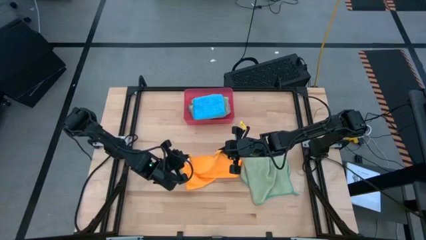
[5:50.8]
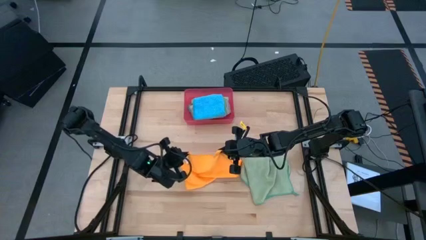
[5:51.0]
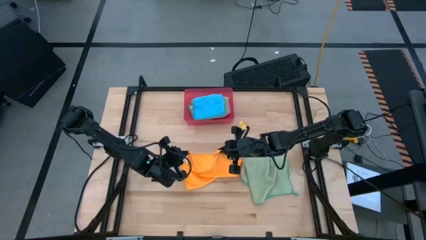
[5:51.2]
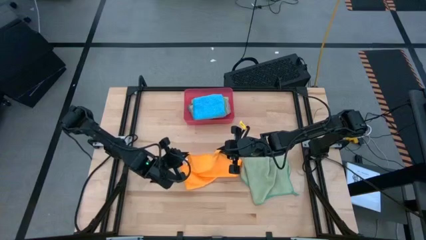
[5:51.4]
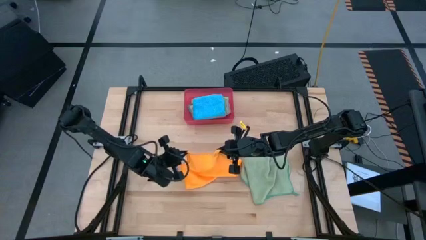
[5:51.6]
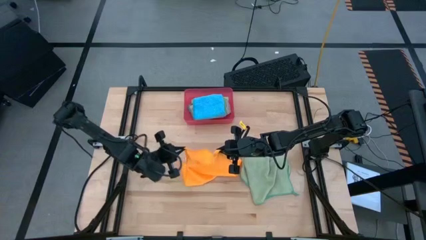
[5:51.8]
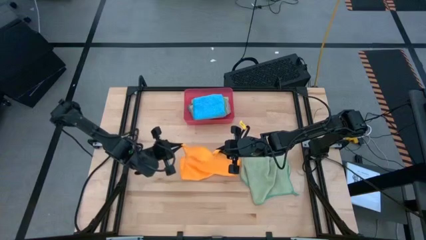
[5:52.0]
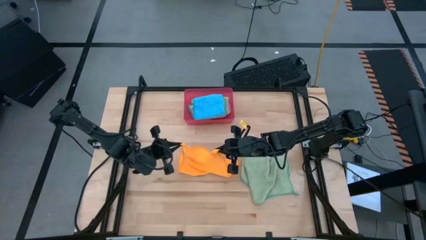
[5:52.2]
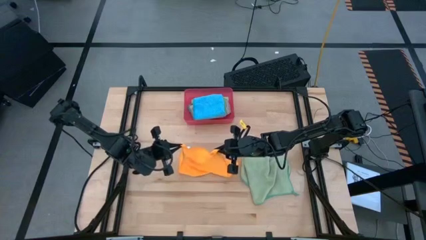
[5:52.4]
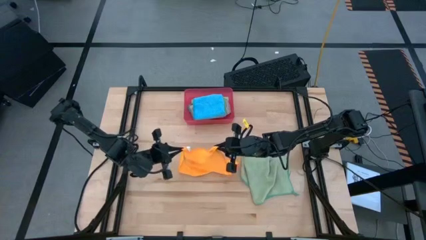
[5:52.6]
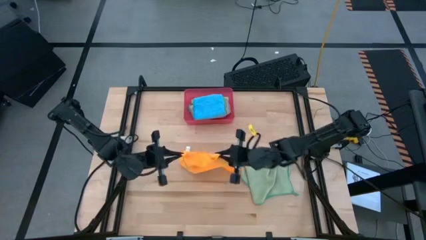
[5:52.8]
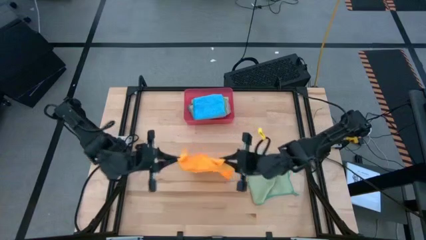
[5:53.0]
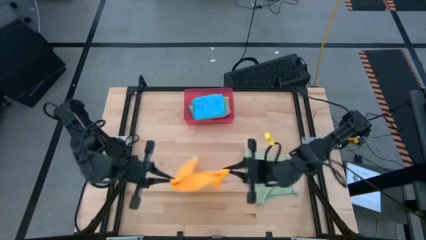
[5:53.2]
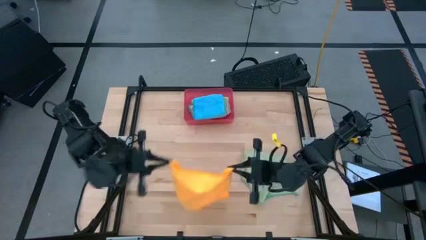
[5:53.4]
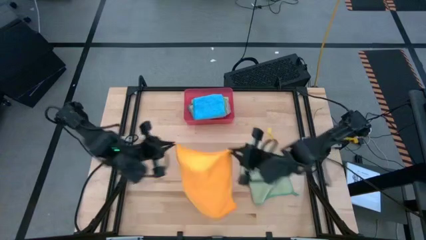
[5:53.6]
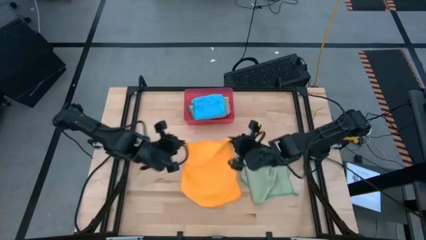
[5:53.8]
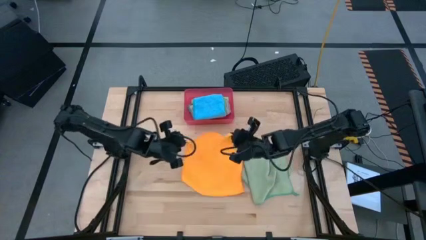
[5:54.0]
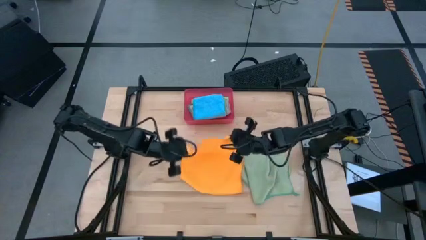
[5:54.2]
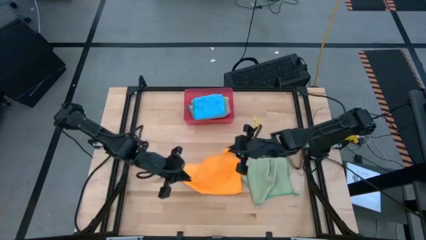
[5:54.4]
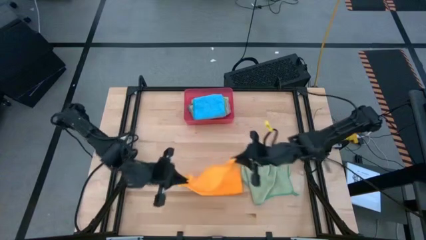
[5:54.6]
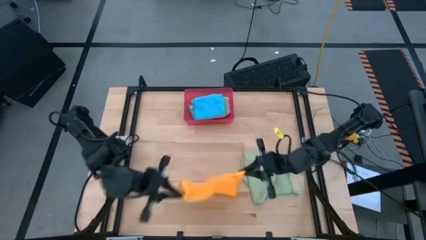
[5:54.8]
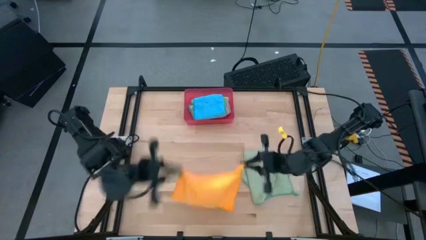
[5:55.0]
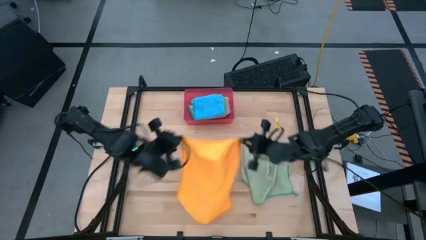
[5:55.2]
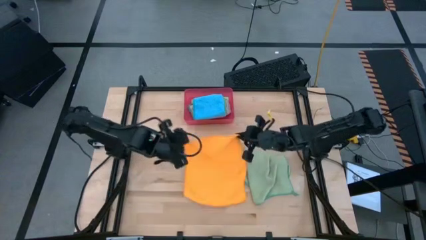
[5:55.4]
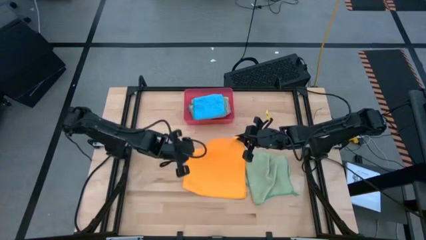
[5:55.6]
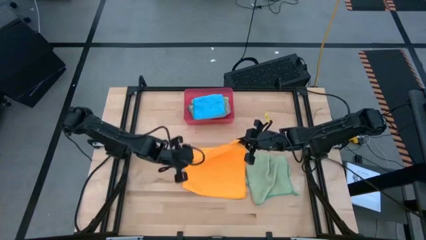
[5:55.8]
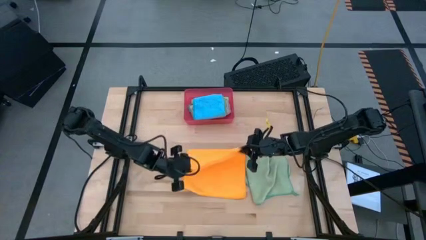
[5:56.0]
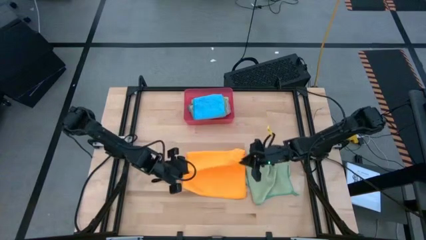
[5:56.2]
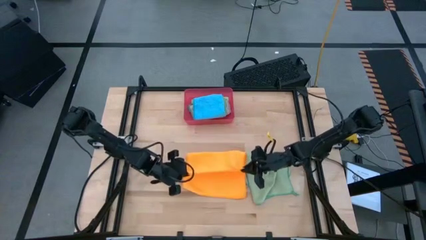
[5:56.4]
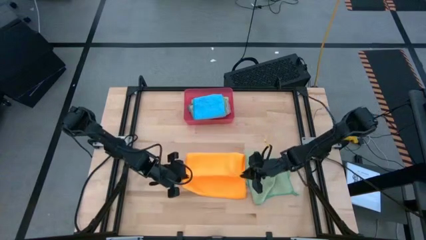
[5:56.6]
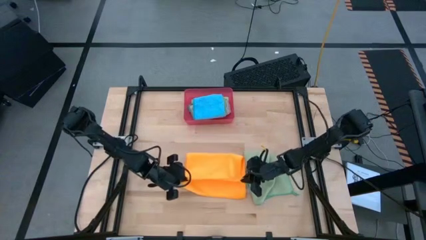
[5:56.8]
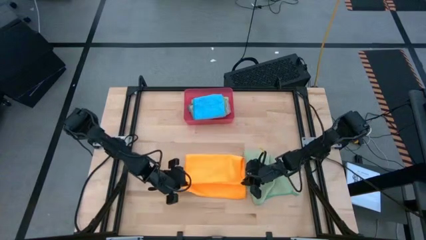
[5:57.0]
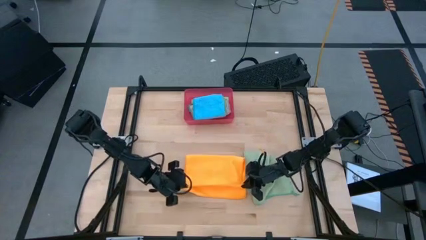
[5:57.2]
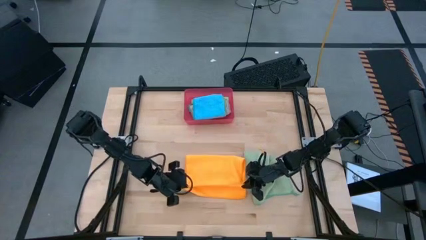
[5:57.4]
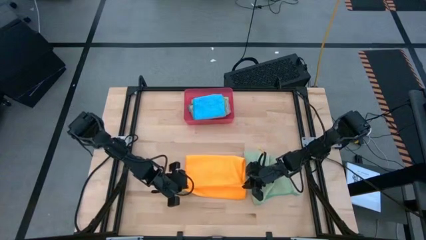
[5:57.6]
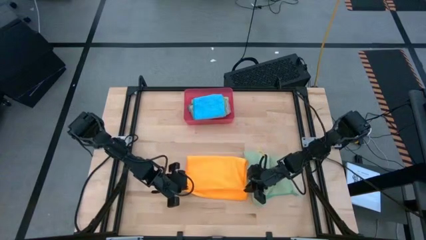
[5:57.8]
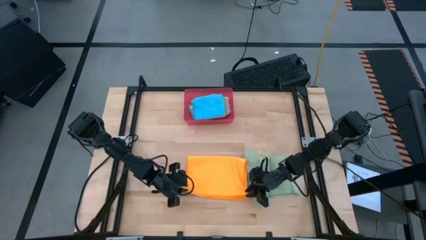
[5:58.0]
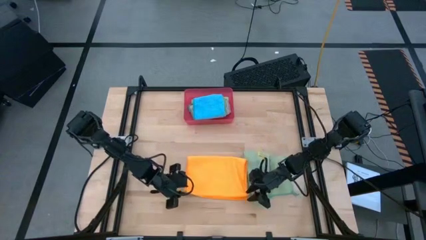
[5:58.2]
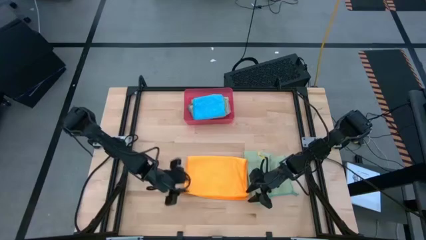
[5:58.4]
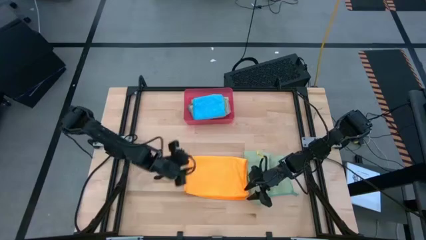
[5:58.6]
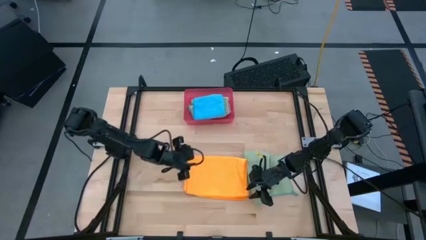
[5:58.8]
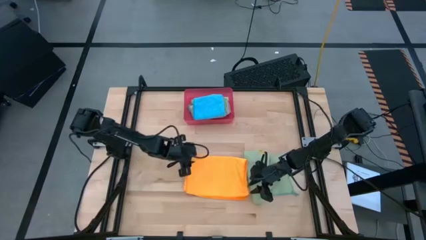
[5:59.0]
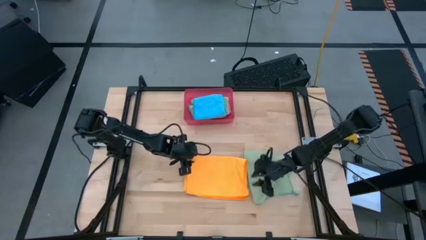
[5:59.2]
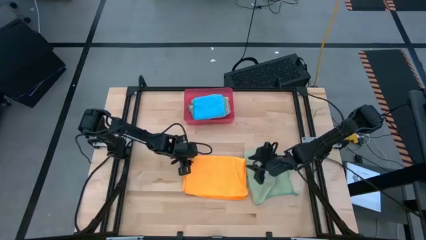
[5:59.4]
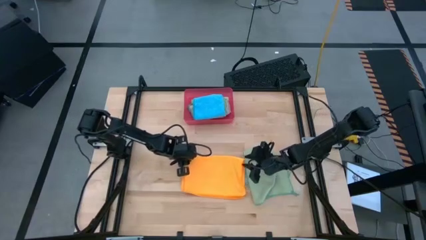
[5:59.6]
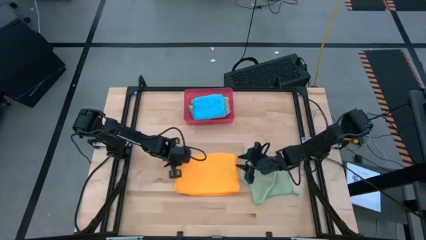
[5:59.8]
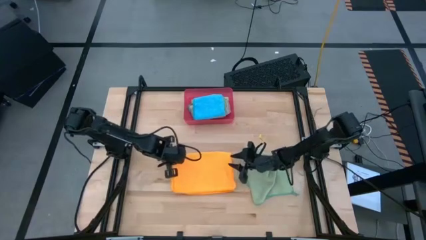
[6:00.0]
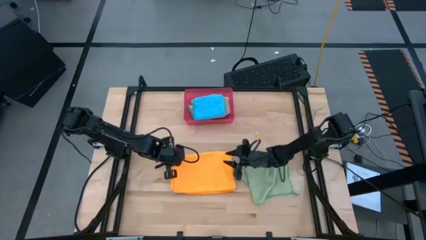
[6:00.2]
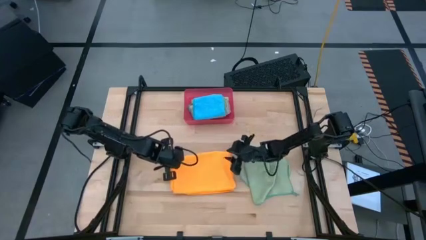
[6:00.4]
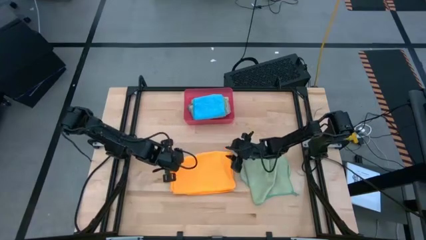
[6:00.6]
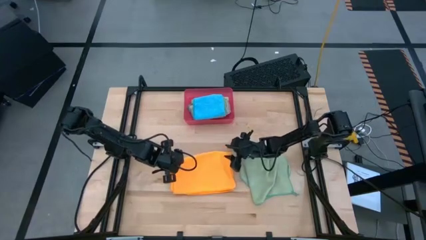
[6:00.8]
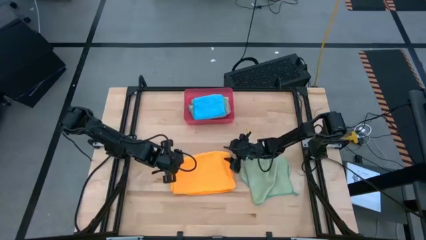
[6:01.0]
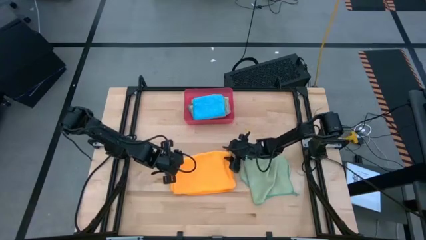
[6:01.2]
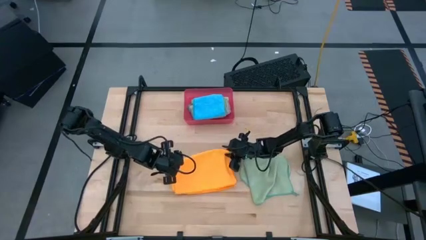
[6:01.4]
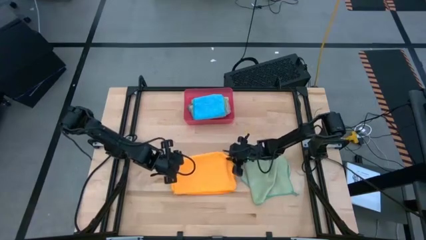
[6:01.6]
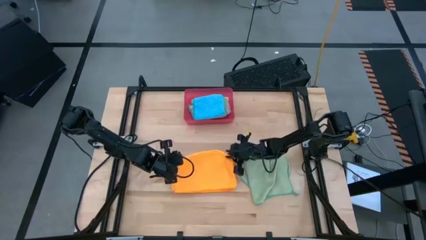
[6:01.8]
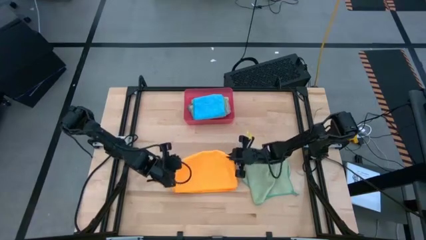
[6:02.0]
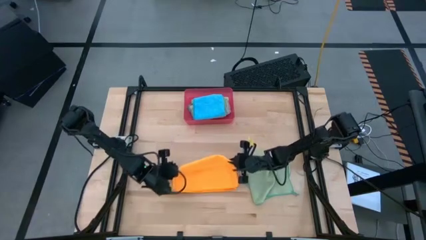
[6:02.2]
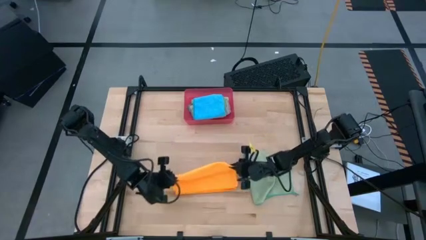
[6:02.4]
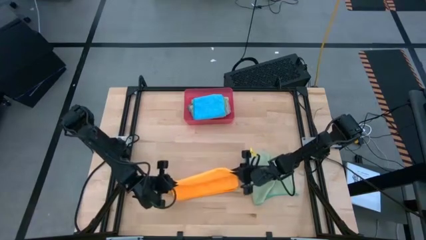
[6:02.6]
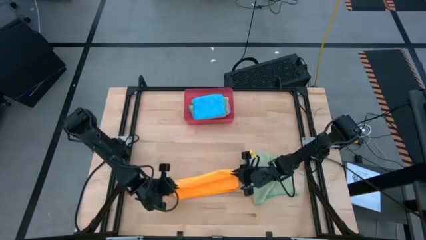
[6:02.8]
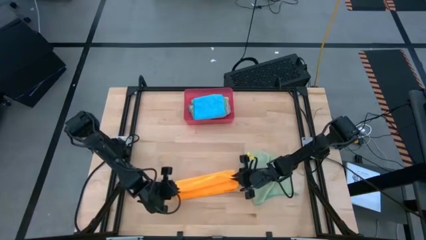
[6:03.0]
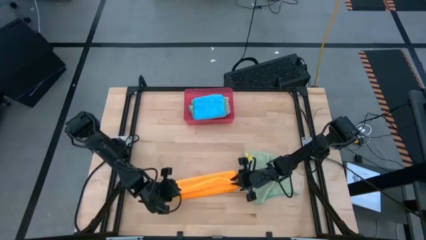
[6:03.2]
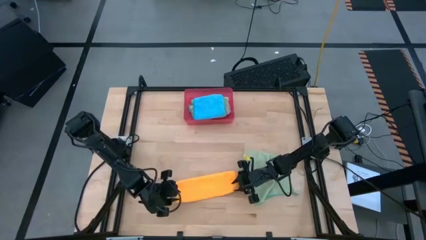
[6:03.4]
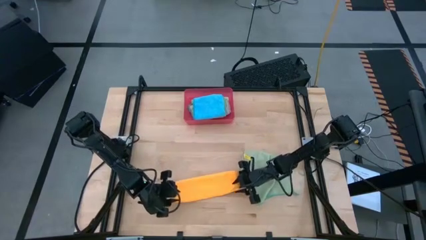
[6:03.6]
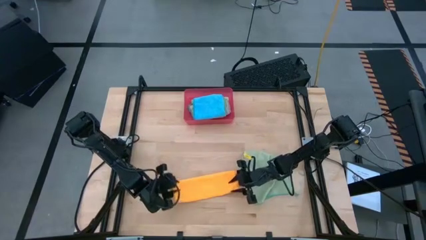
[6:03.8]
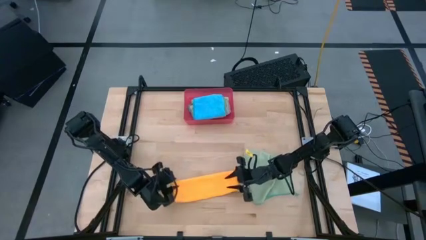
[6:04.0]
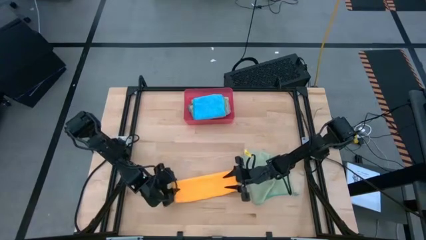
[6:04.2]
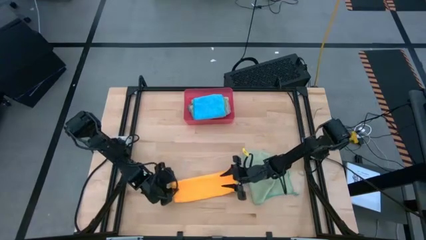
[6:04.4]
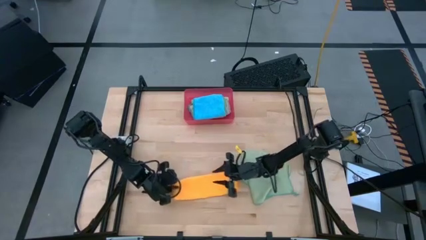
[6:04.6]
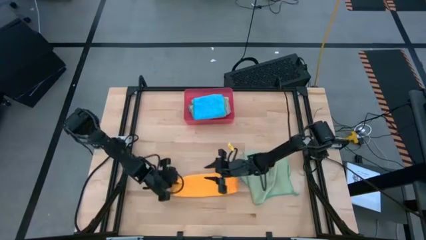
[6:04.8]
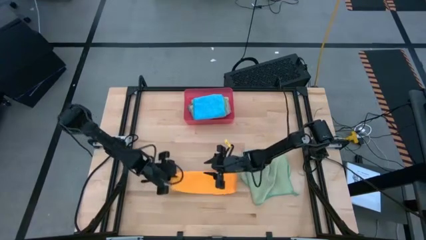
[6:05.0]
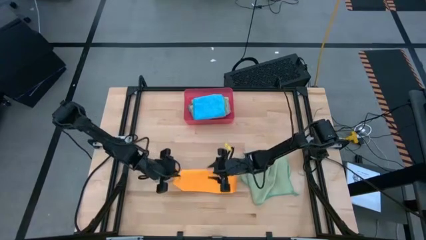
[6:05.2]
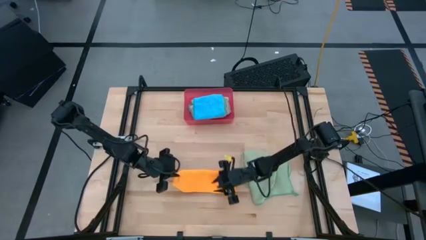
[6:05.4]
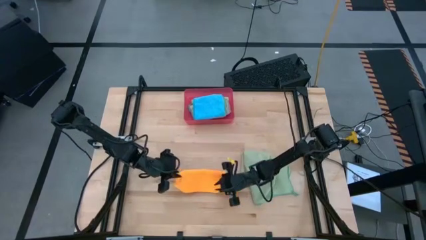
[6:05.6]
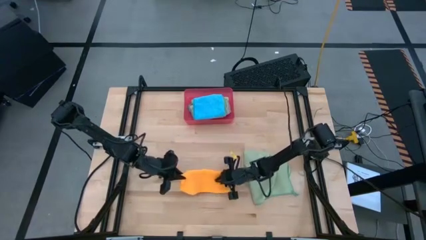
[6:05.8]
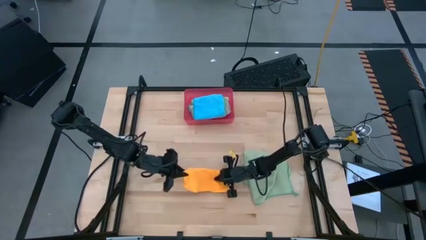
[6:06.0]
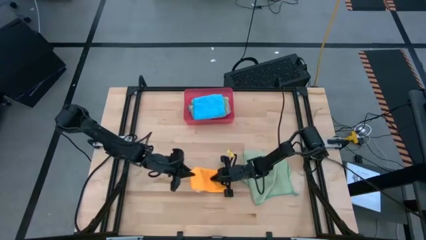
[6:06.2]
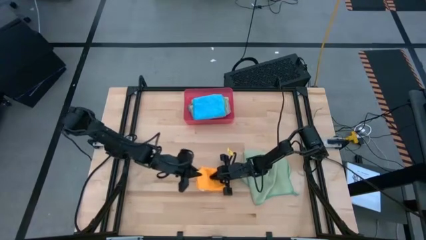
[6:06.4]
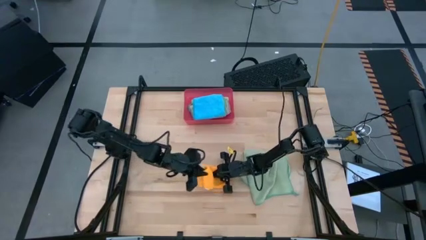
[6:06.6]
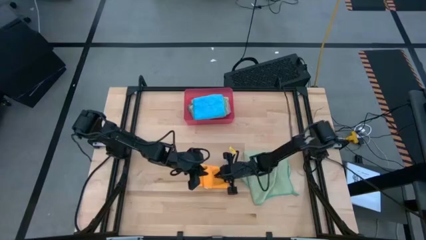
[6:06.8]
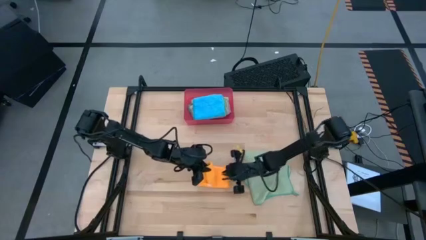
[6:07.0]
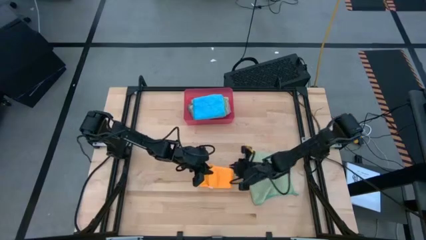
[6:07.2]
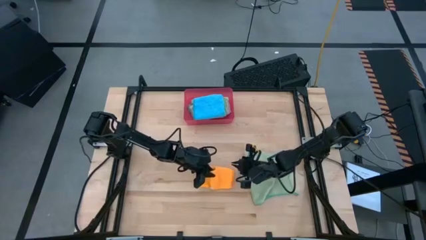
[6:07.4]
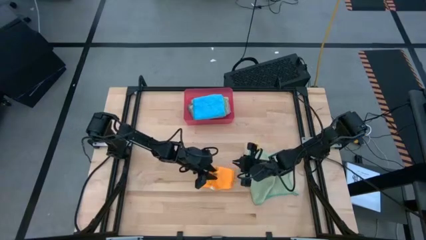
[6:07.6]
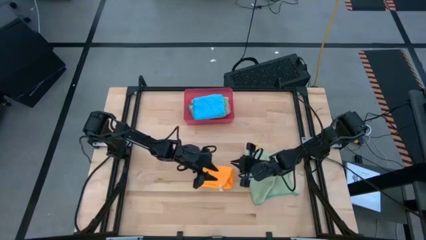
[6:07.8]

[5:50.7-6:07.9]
Task: Fold microfiber towels
Fold the yellow towel
